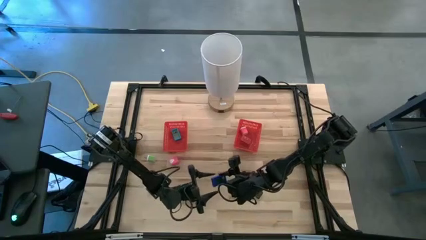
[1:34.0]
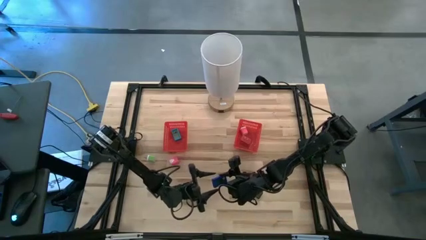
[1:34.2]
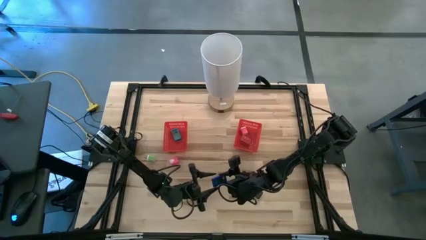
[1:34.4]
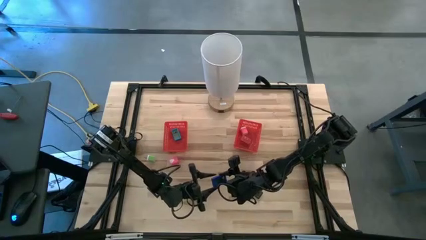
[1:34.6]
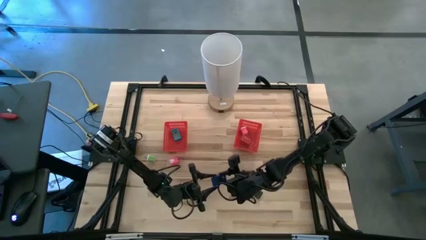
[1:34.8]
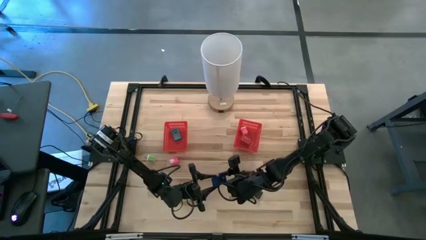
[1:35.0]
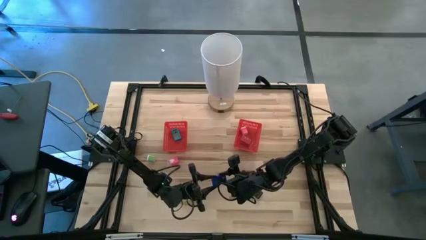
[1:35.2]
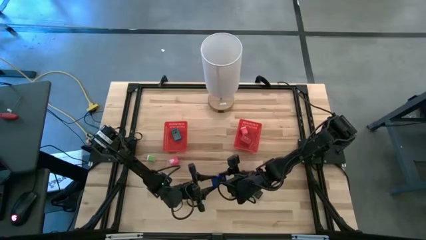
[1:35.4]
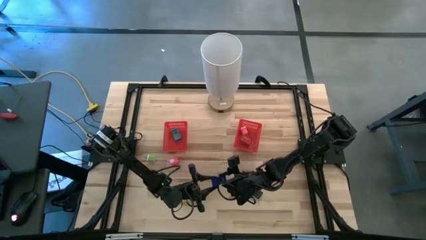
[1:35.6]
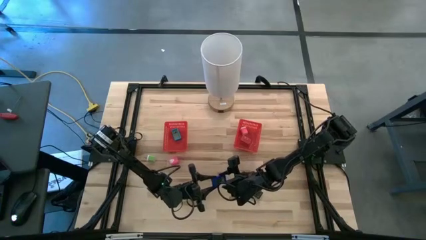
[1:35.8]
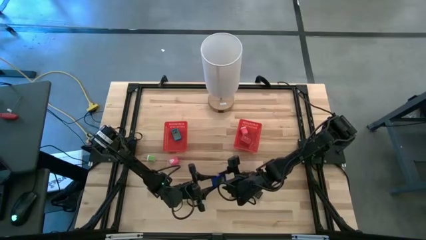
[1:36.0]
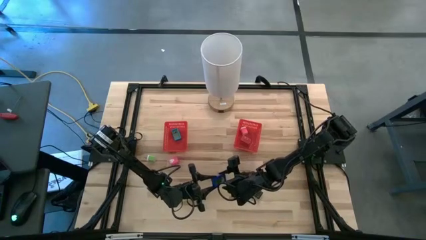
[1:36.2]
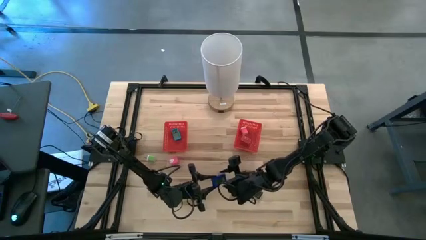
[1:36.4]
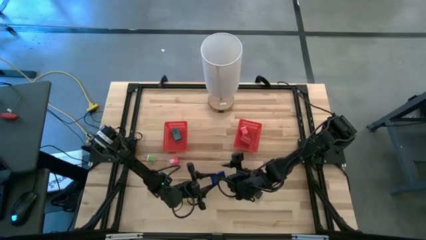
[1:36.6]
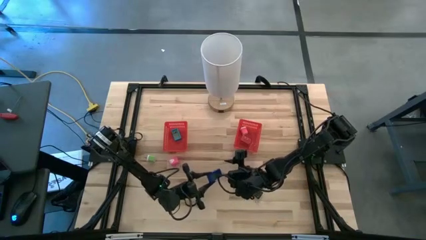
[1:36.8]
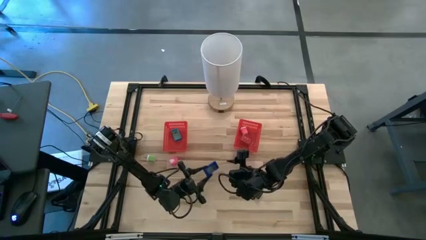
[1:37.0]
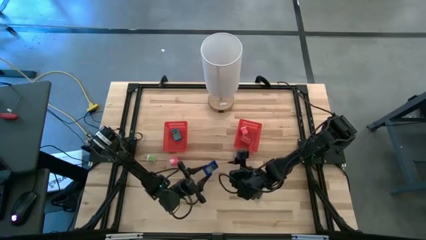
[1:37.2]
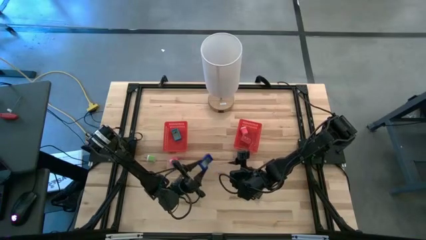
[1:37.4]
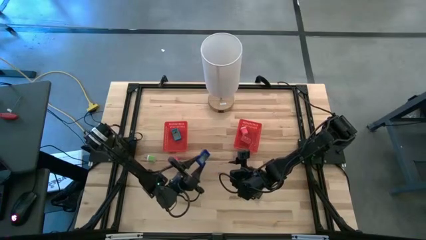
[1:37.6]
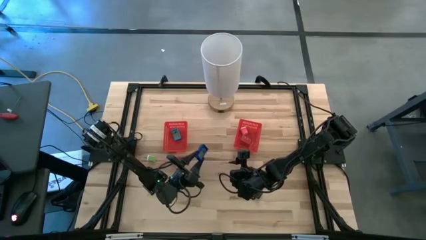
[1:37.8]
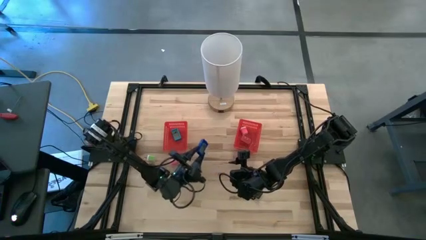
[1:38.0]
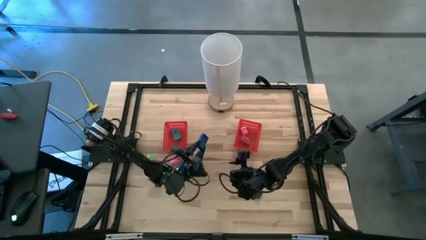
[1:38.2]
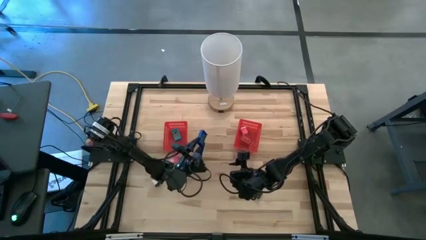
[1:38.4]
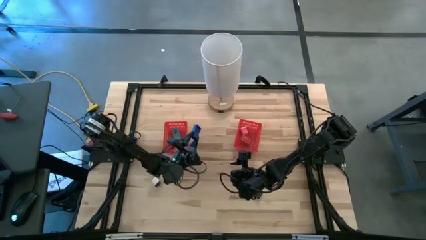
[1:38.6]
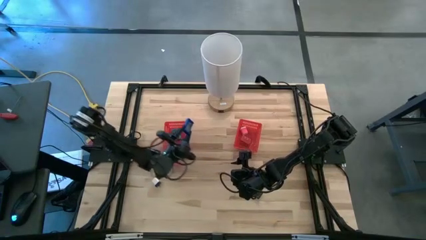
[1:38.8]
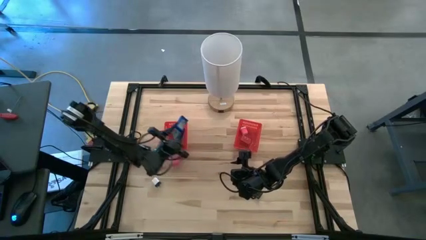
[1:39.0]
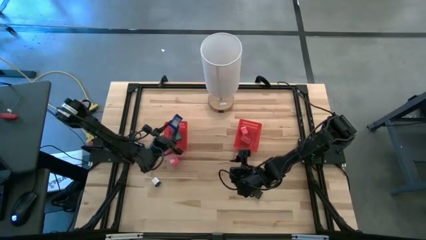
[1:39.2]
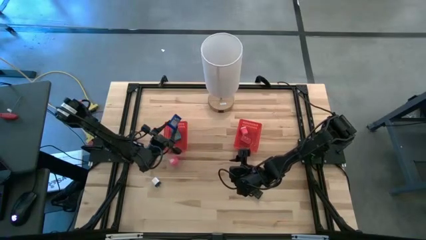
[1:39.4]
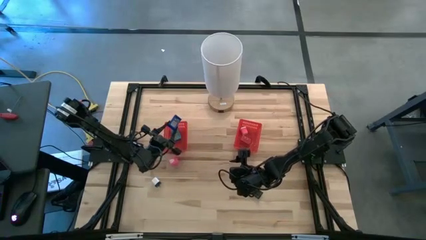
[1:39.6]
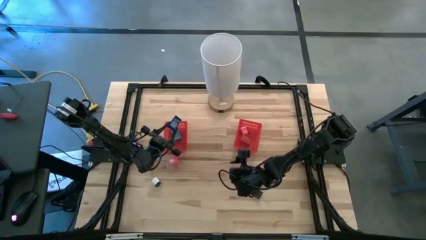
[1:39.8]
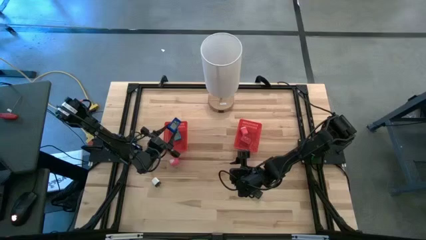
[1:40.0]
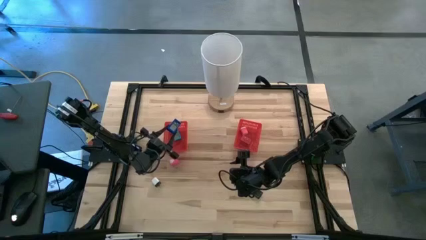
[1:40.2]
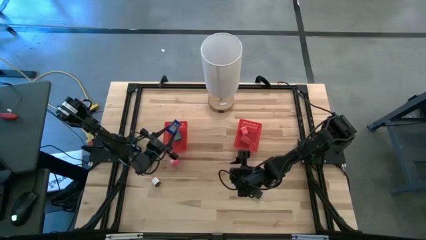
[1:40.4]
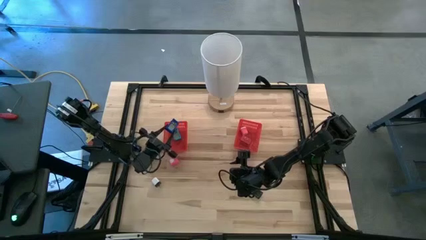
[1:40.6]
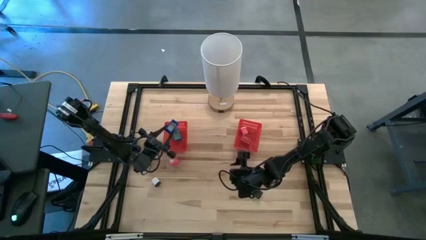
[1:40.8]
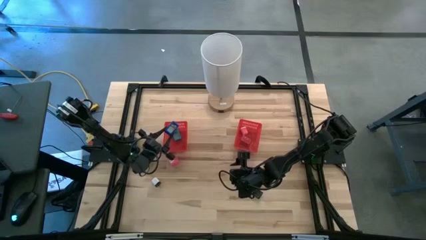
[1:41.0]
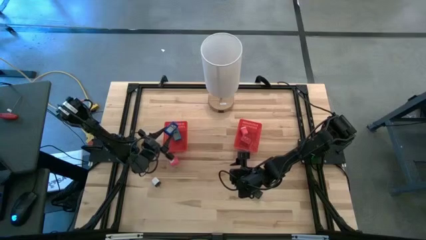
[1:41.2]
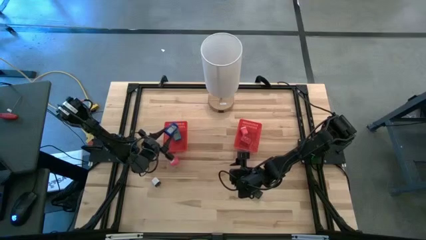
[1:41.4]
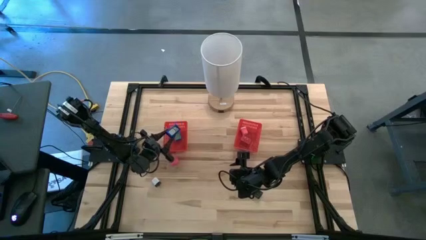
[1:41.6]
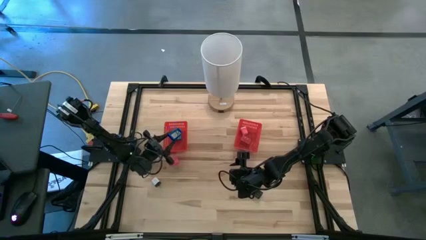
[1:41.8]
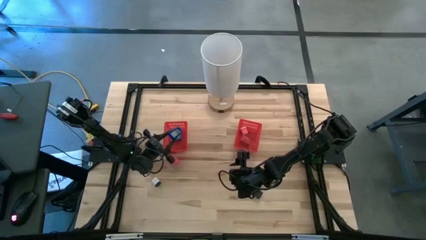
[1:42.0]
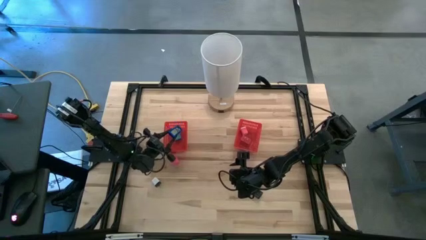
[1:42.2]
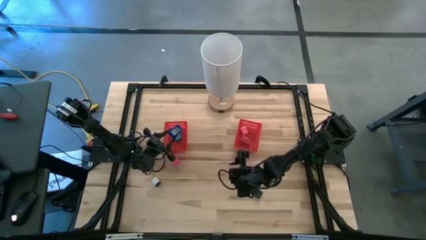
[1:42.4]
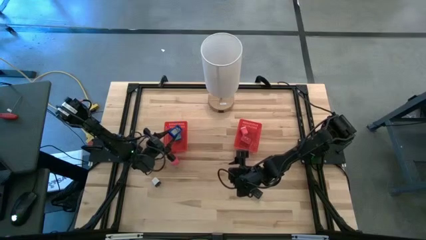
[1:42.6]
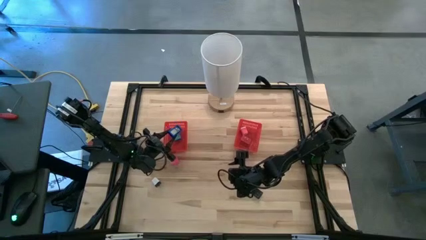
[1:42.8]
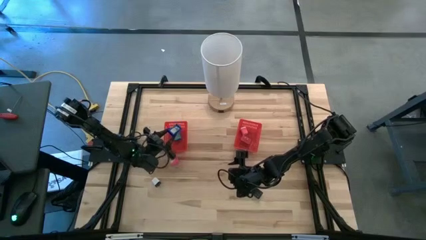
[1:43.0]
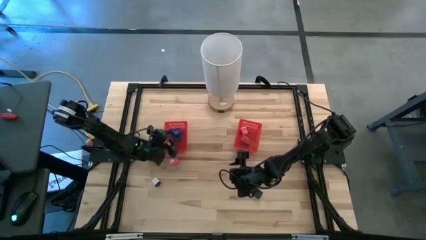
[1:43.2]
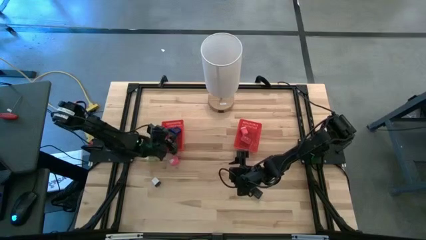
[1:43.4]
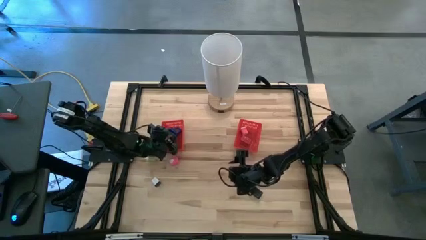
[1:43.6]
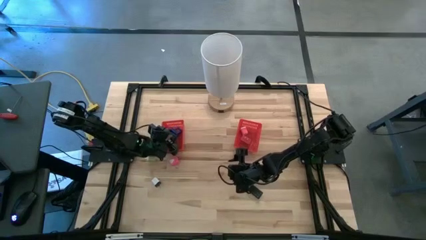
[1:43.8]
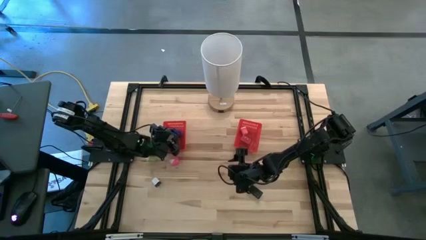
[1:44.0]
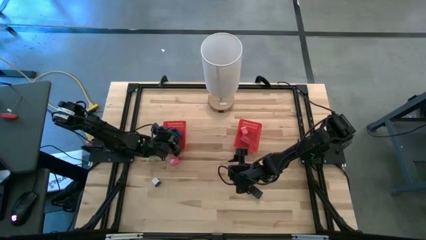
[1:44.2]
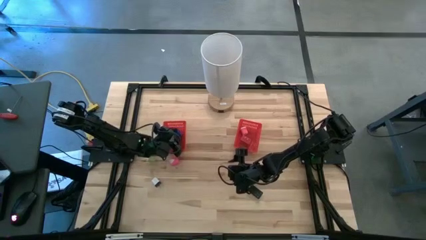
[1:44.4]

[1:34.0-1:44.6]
Task: Pick & Place Office items
Put the dark blue digital timer into the left red bin

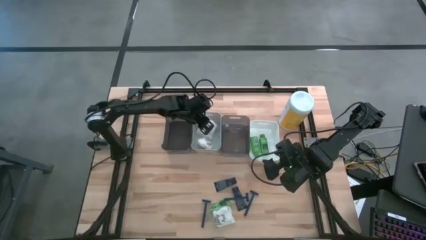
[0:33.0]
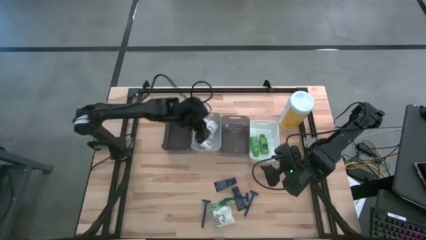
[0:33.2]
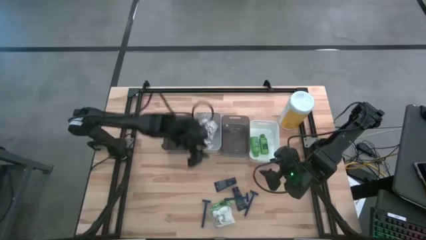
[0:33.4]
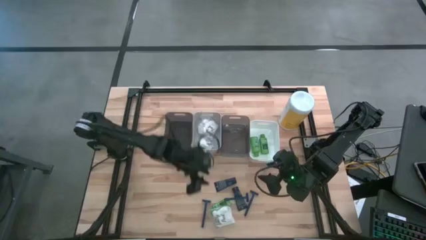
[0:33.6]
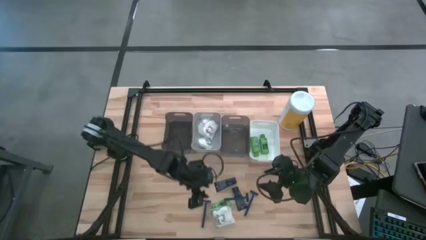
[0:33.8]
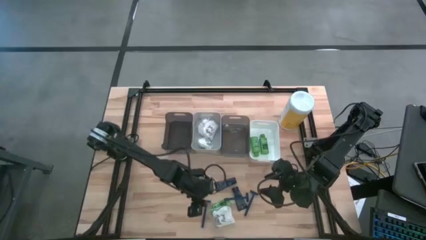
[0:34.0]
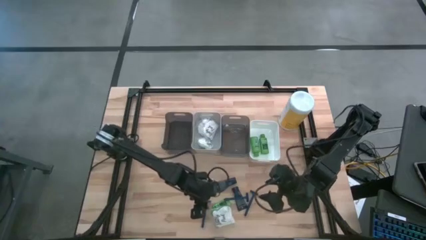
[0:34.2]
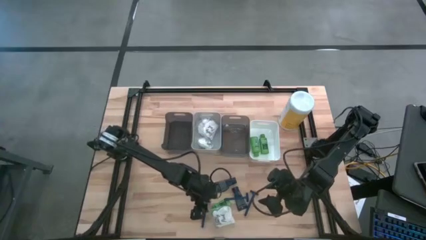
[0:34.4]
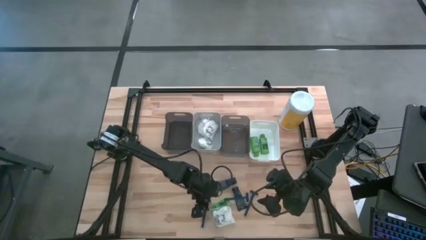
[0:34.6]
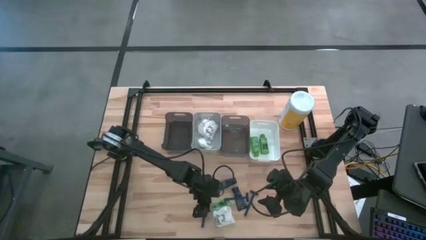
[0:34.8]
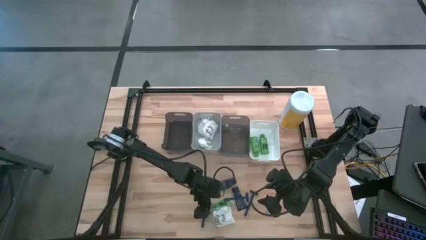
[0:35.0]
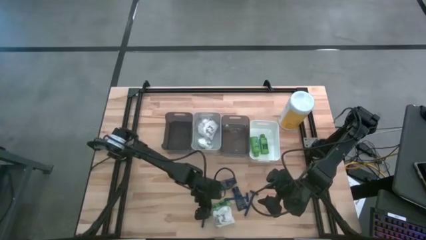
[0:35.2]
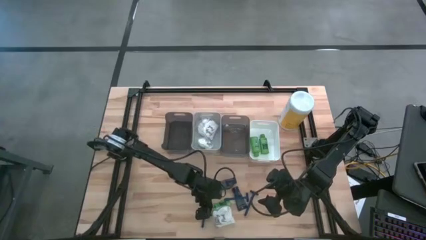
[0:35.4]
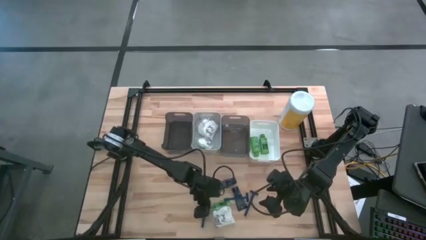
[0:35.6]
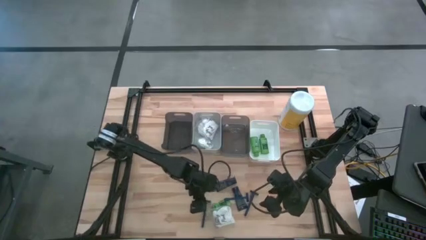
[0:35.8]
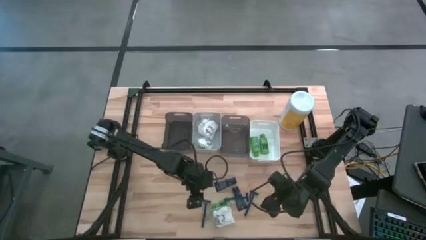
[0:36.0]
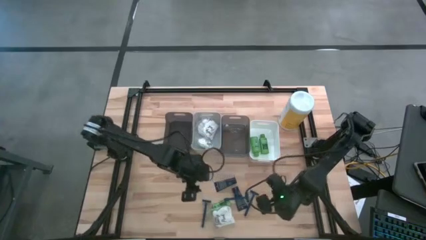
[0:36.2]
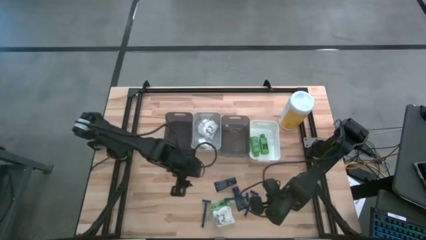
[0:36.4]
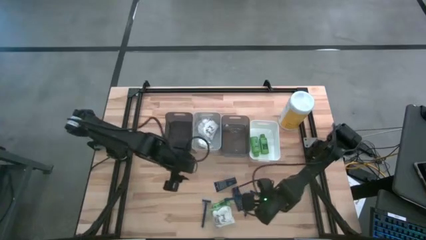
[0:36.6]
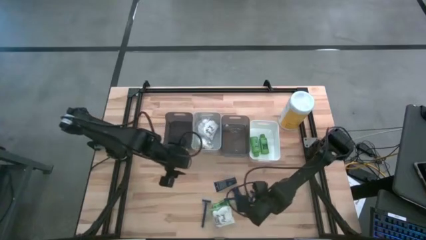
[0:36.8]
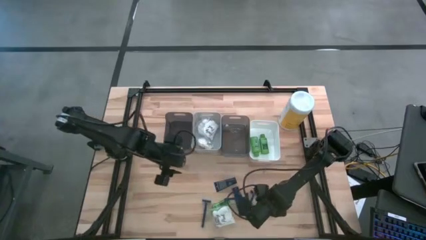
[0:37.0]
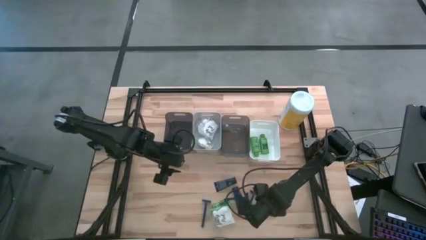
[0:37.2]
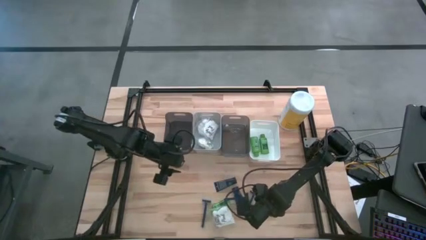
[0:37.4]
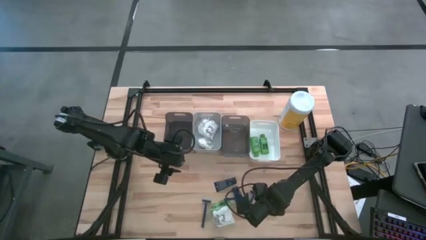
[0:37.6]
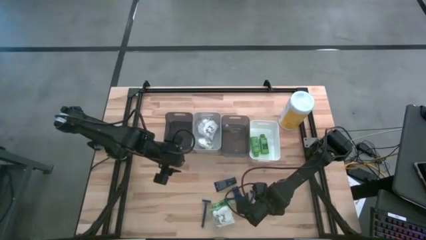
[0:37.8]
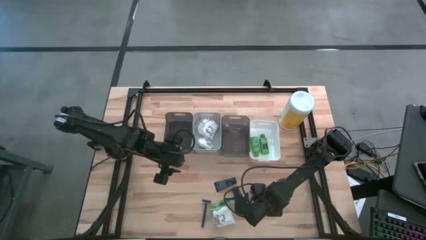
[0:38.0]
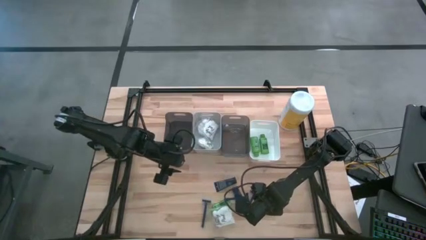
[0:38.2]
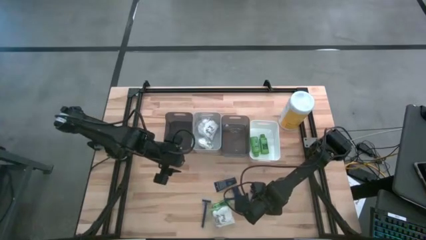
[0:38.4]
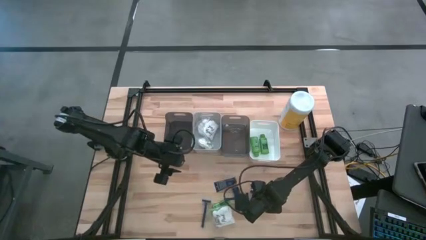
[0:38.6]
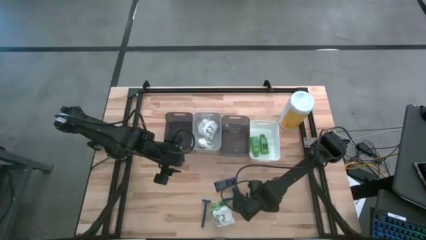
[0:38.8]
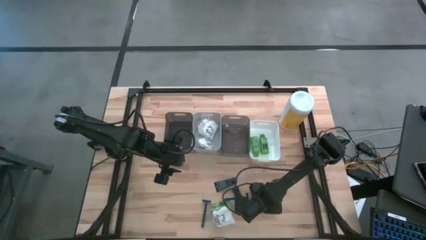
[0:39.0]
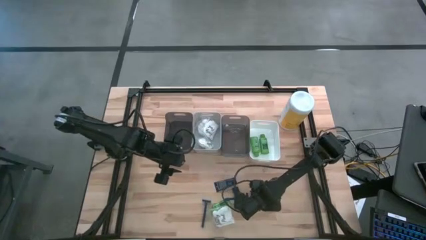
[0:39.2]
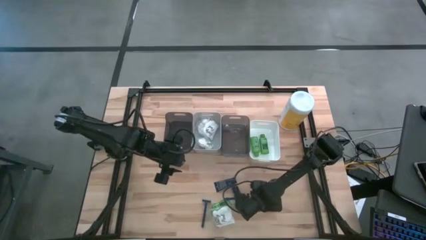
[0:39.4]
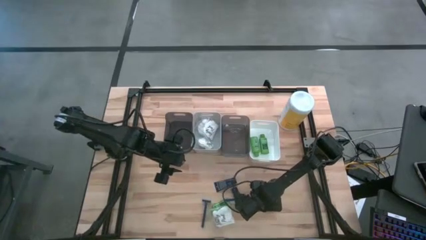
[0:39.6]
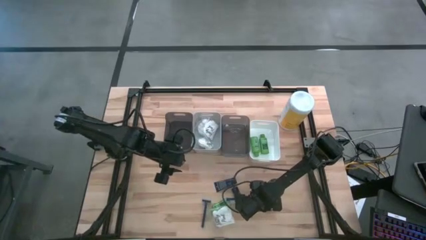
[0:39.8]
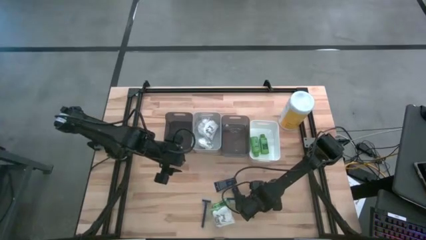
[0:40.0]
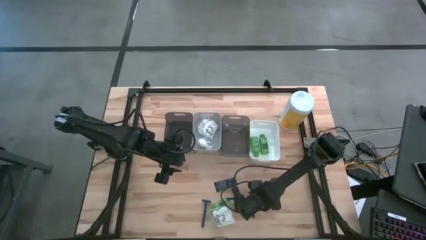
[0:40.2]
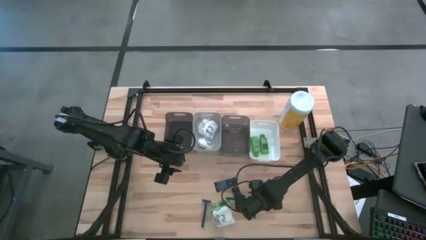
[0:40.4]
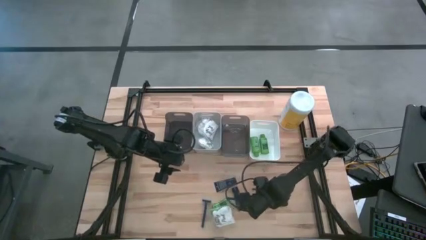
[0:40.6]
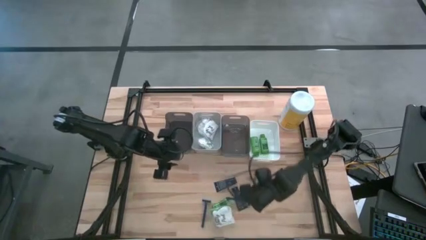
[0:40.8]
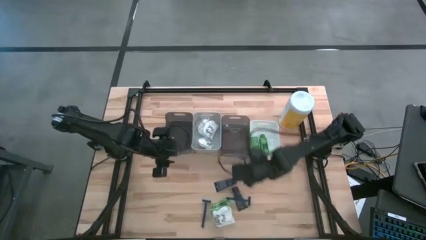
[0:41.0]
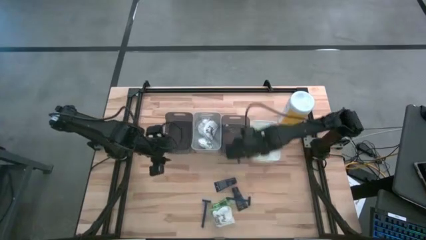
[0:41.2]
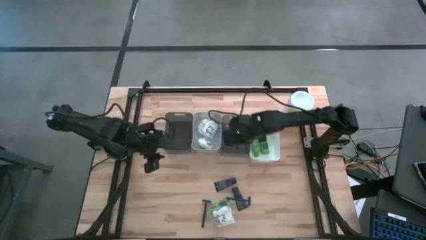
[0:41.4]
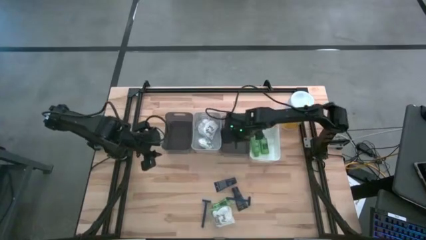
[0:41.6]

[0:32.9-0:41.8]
Task: Pick & Place Travel size toiletries
Put the blue razor into the right black bin
